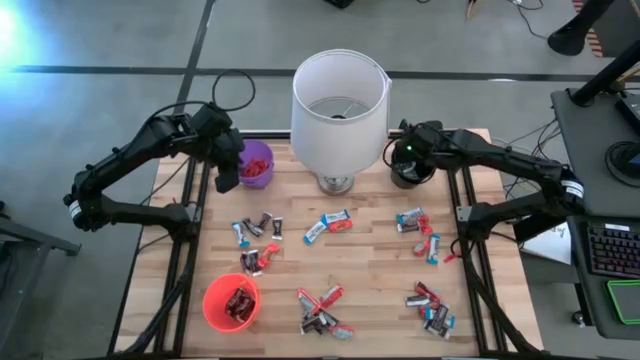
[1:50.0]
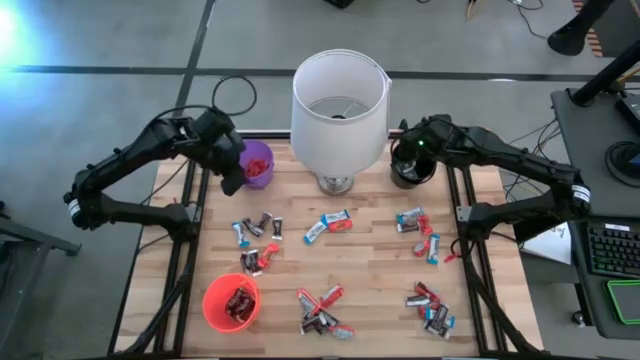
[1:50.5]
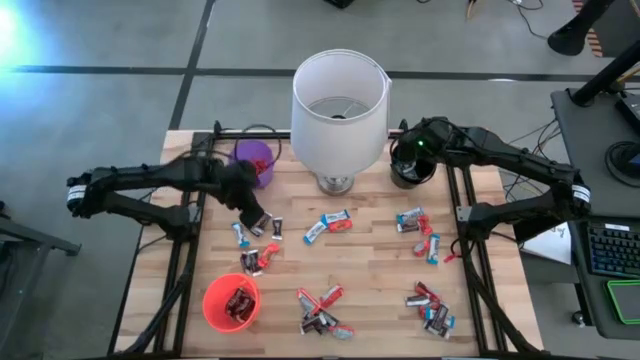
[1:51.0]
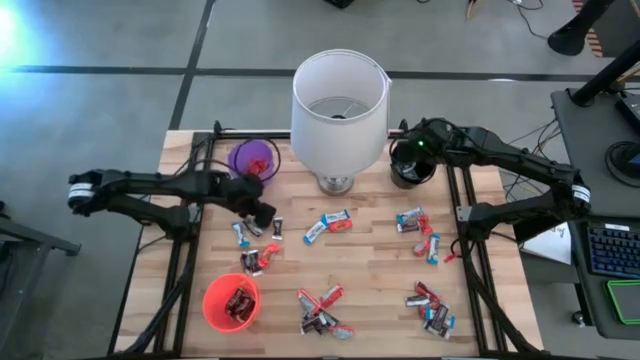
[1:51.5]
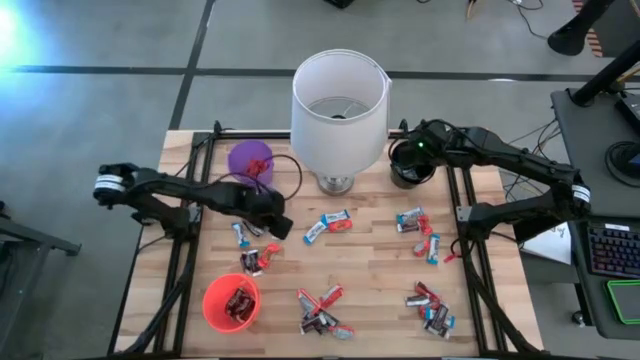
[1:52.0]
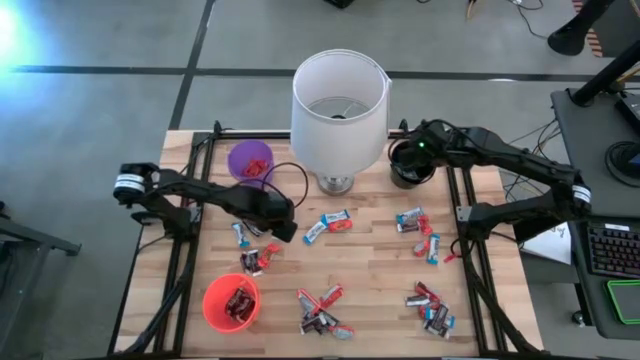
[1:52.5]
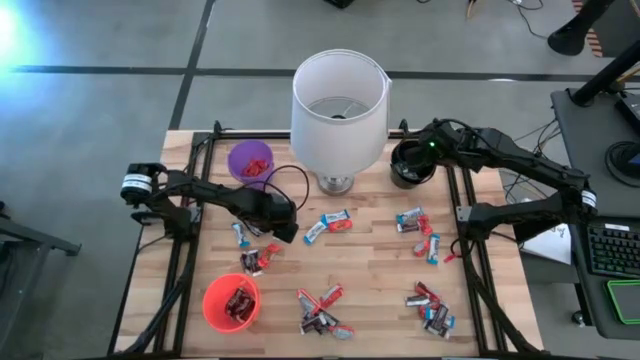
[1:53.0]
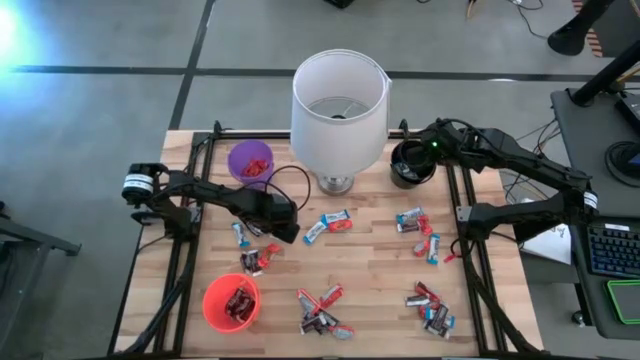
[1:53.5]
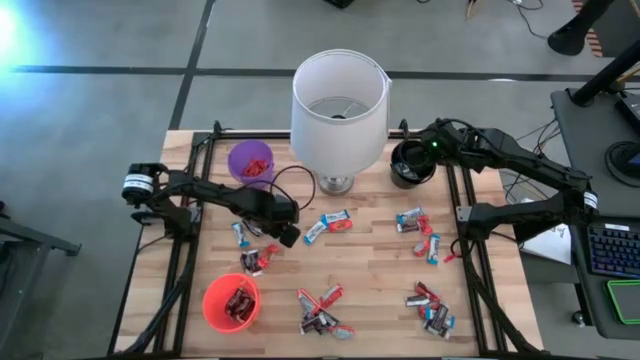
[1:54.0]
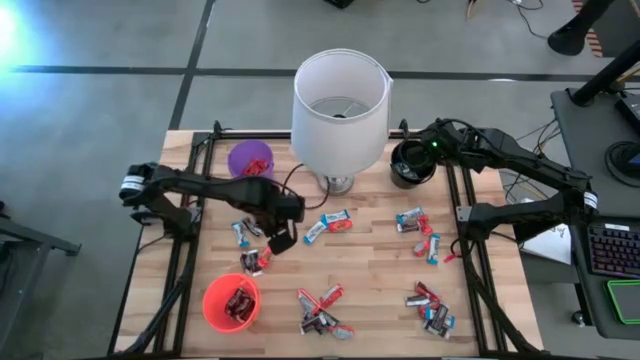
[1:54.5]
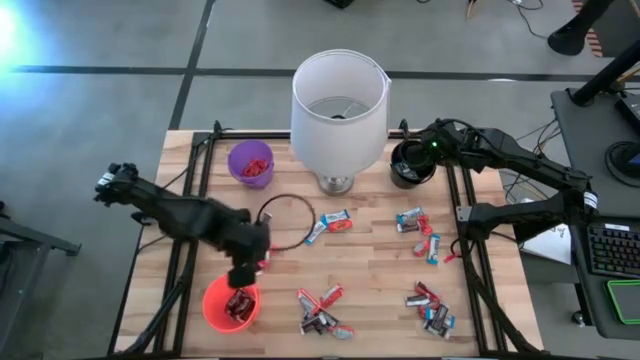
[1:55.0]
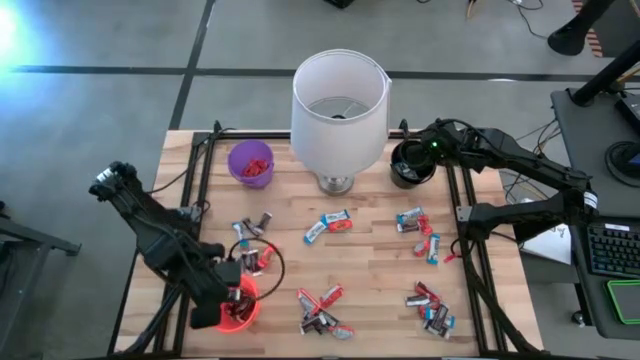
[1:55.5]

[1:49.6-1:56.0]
Task: Sort candy
Put the black chocolate into the orange bucket

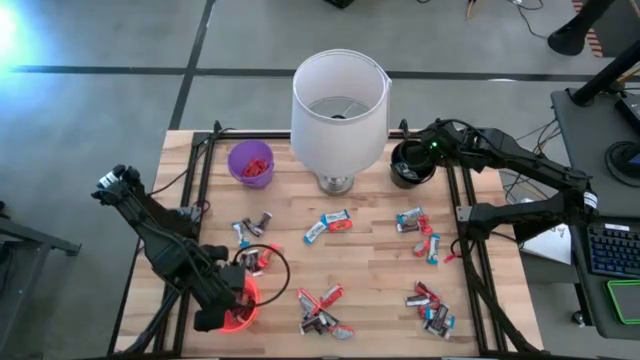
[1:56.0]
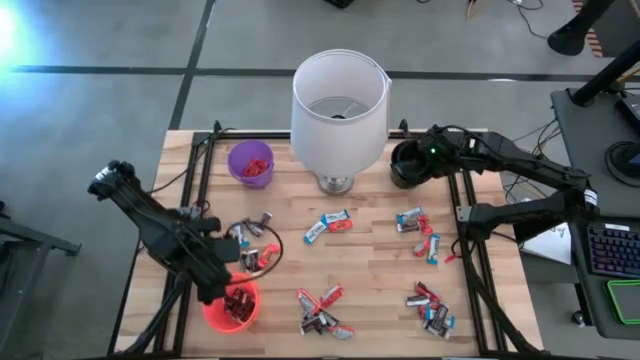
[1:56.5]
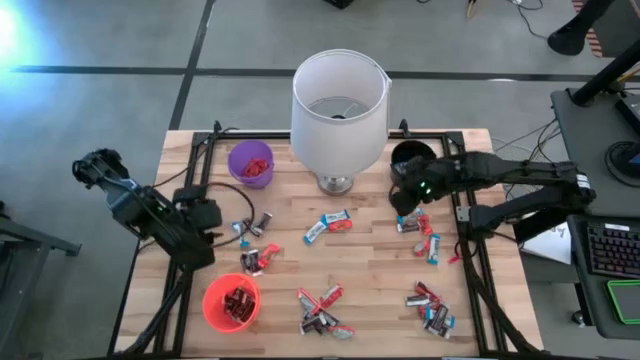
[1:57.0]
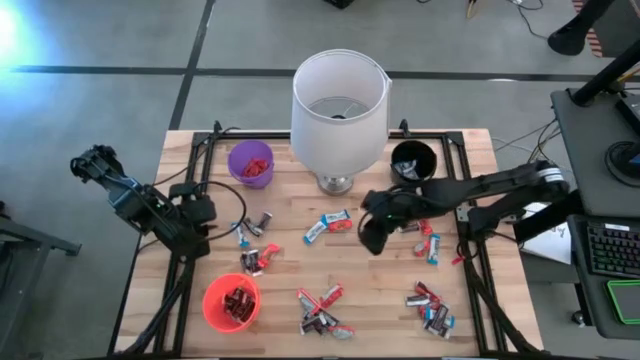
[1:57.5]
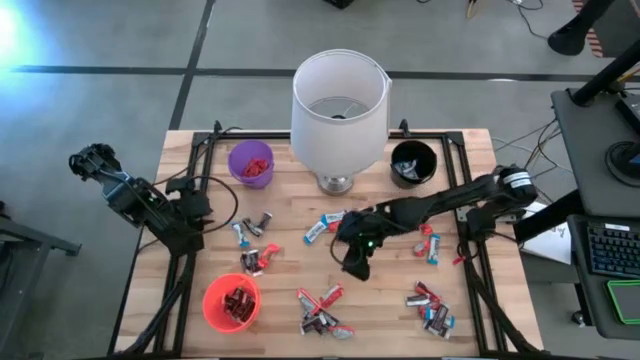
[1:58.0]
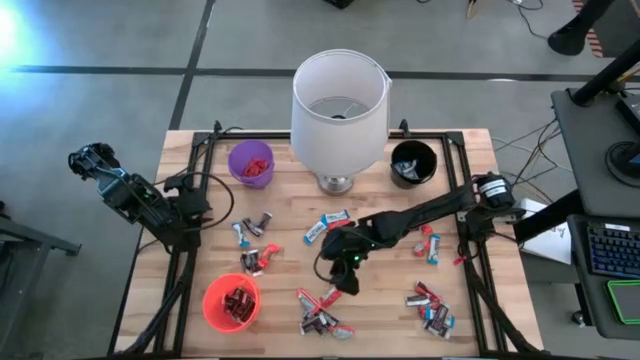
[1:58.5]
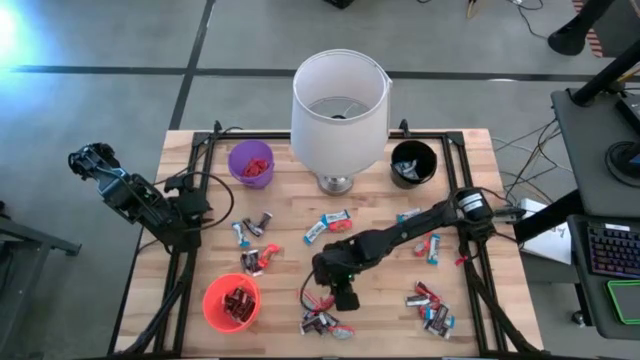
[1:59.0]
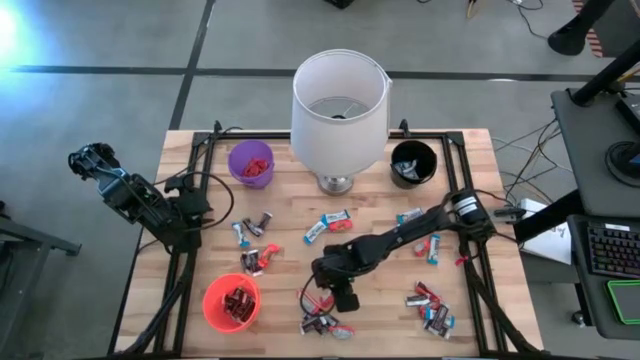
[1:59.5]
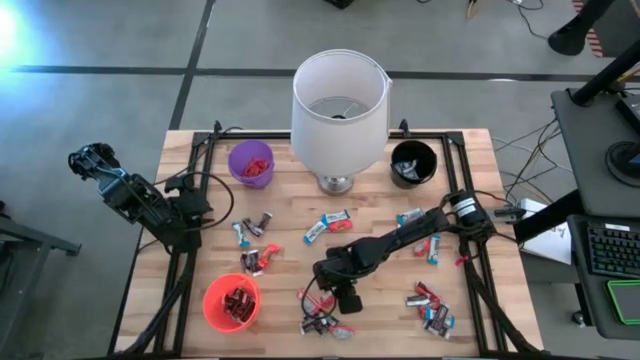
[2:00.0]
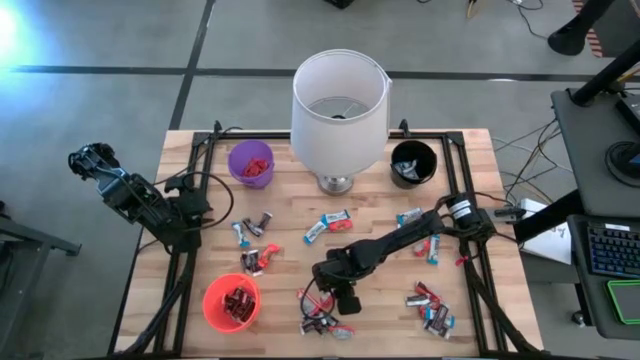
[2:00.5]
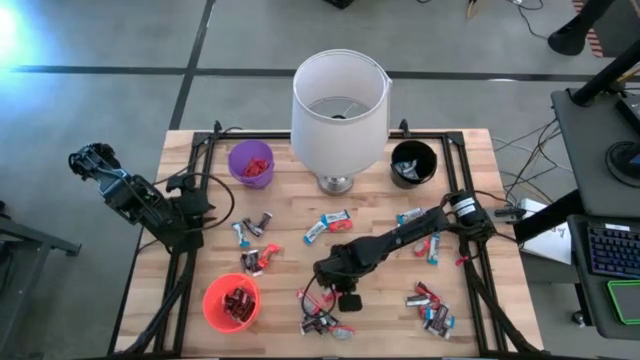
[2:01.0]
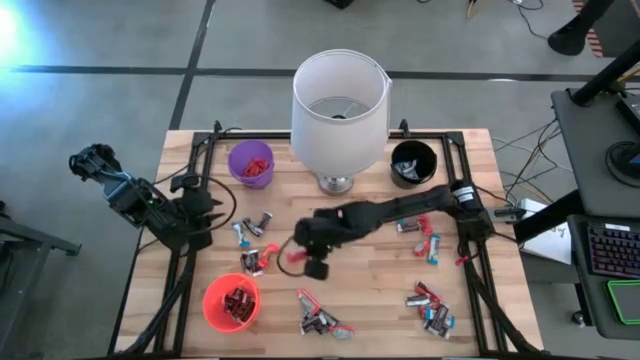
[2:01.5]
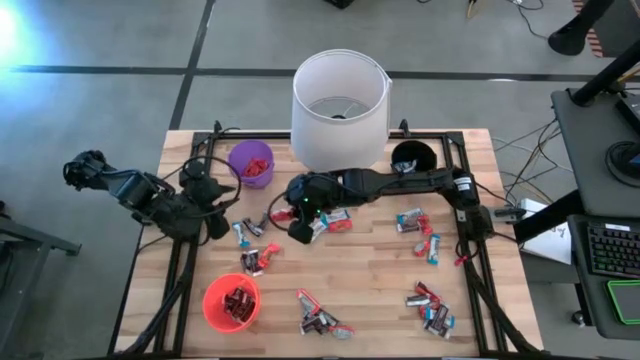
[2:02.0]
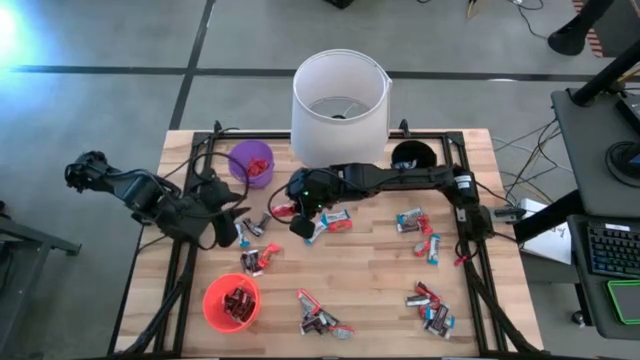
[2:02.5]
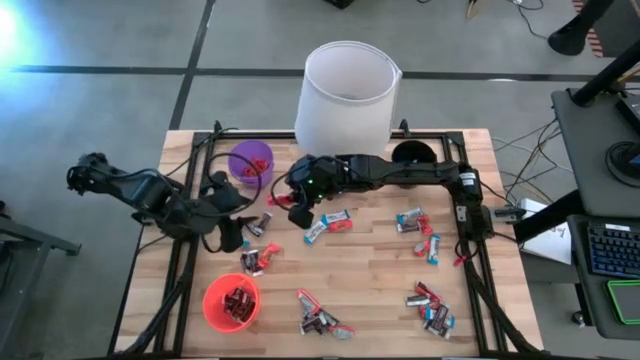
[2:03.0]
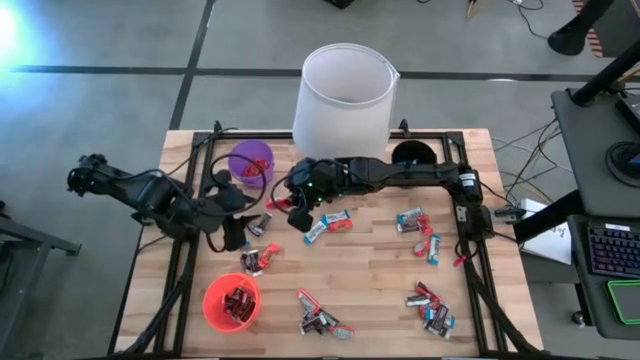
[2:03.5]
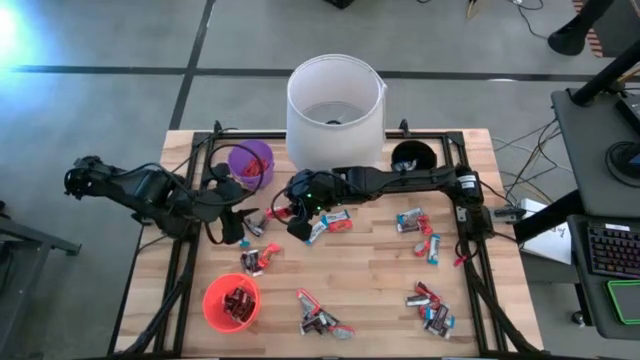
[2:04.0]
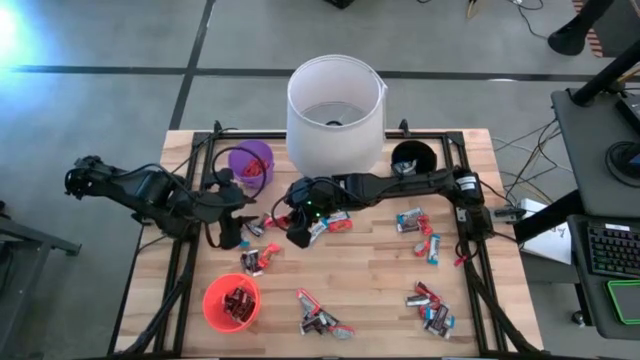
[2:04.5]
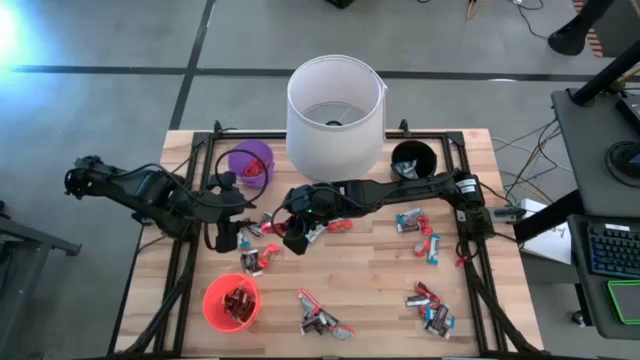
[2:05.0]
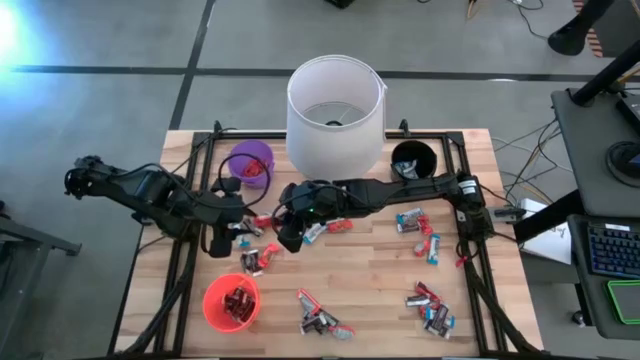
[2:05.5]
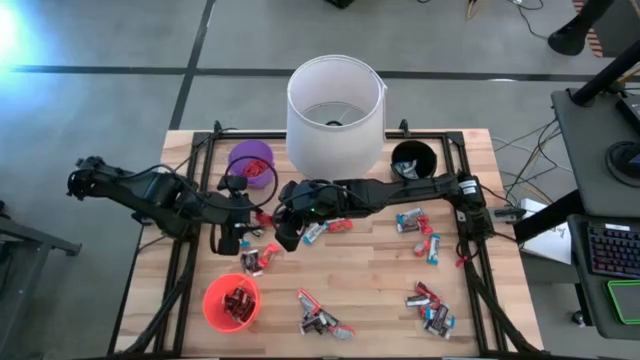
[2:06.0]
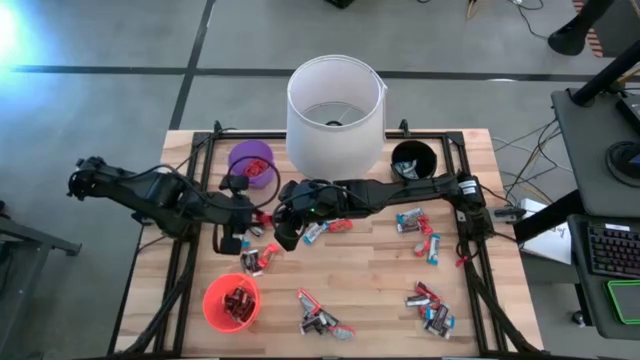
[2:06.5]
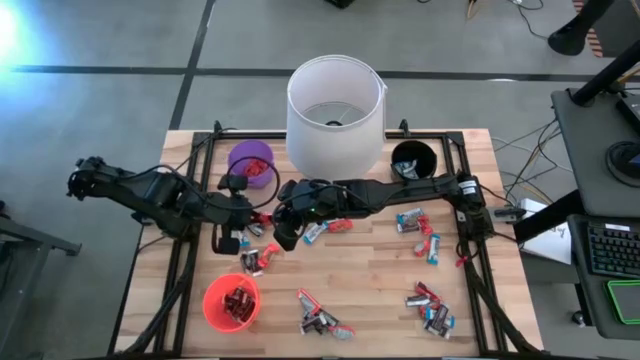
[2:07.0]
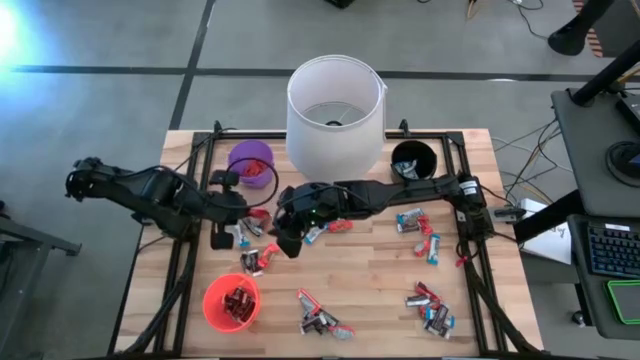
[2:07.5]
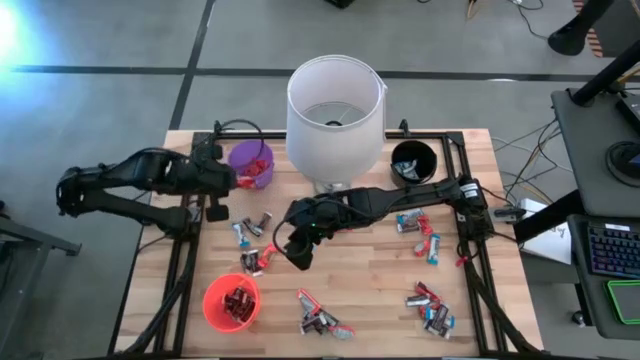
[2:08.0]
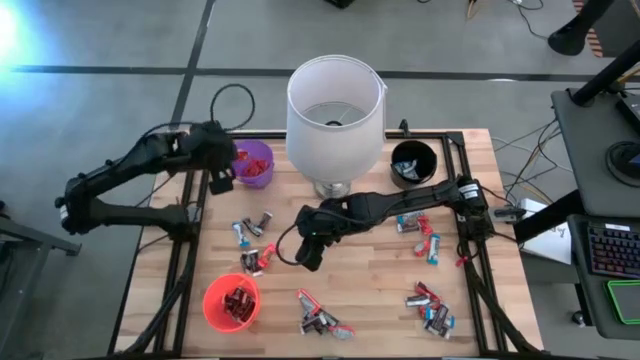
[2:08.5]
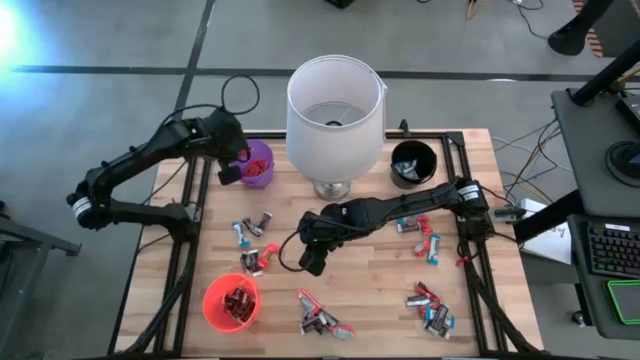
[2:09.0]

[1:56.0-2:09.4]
Put the orange chocolate into the purple bucket

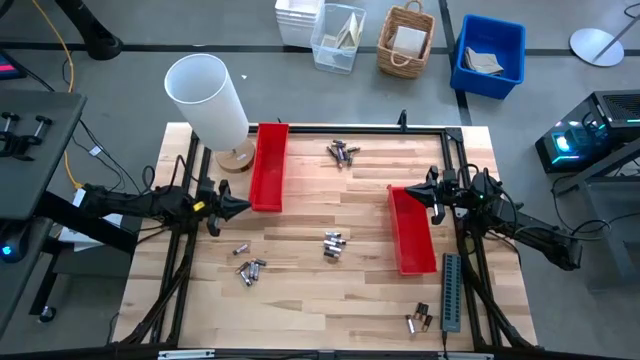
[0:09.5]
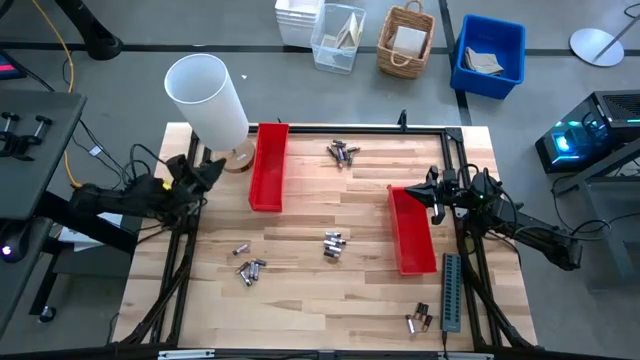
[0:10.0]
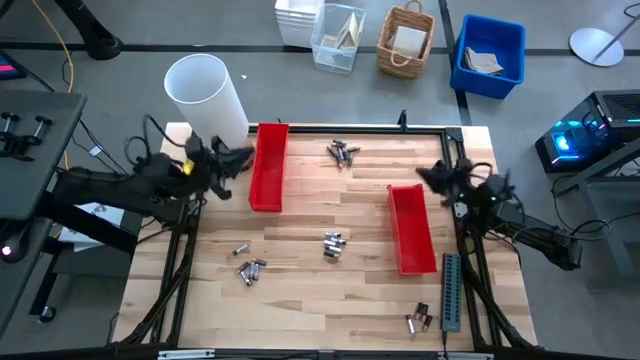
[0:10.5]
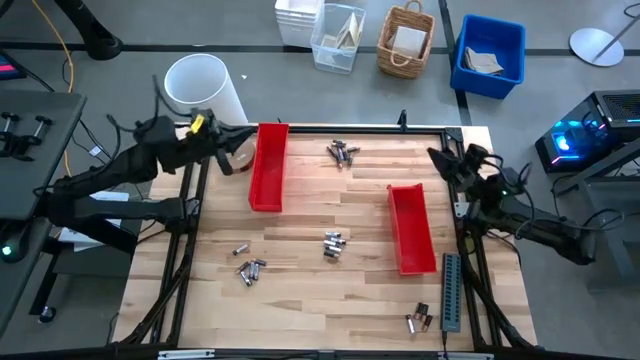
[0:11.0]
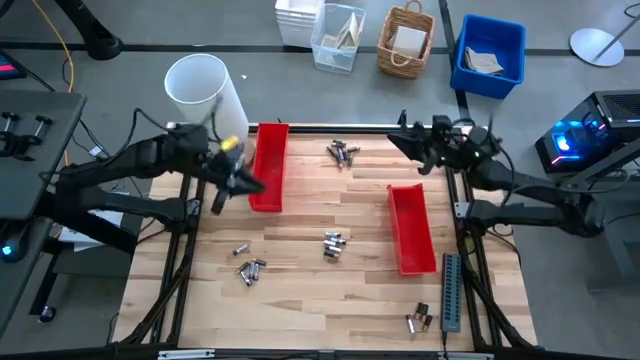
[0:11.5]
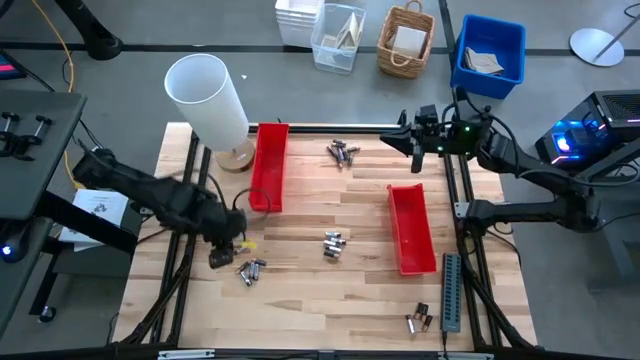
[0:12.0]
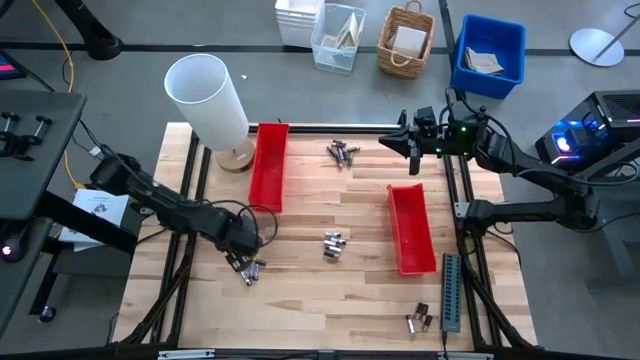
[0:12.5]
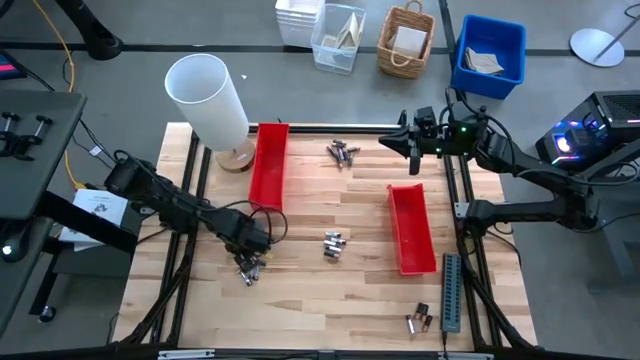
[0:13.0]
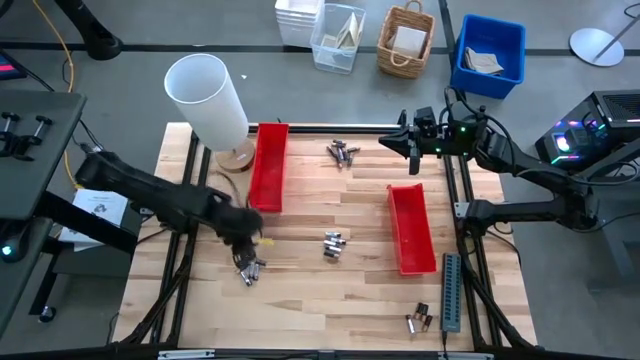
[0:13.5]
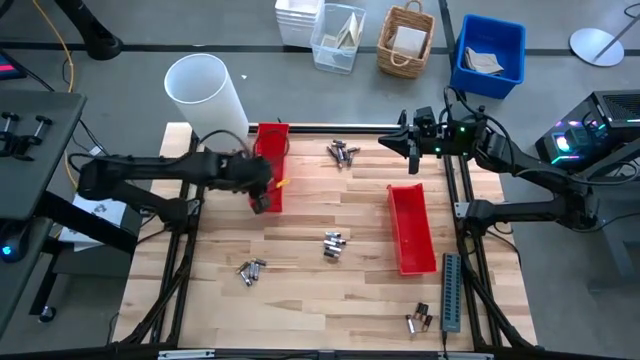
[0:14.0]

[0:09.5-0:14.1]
Task: Sort batteries
Put the silver battery into the top red bin
